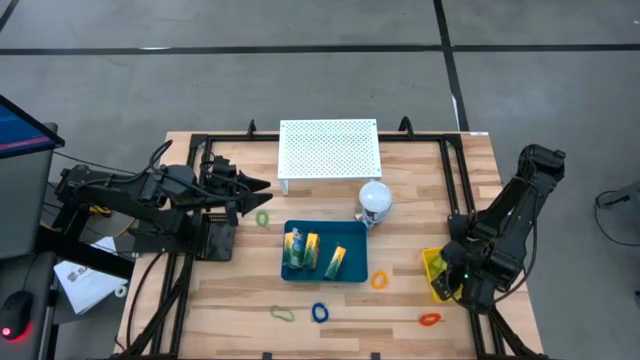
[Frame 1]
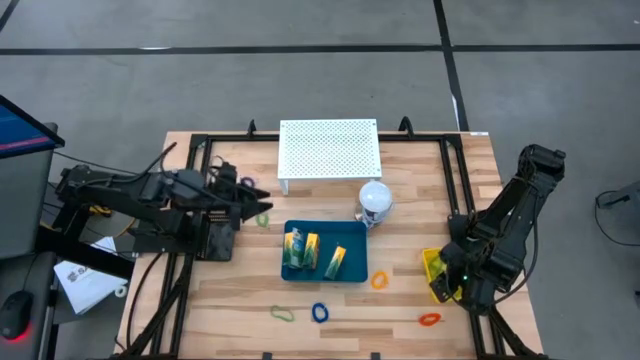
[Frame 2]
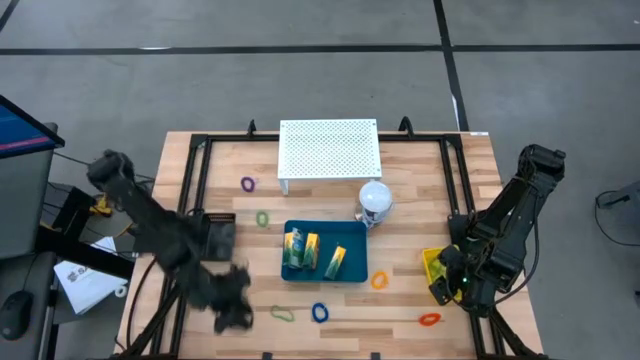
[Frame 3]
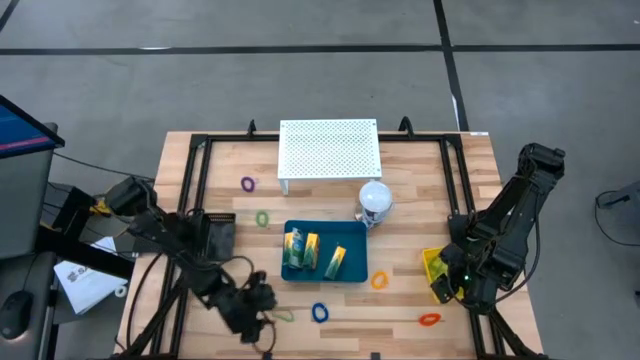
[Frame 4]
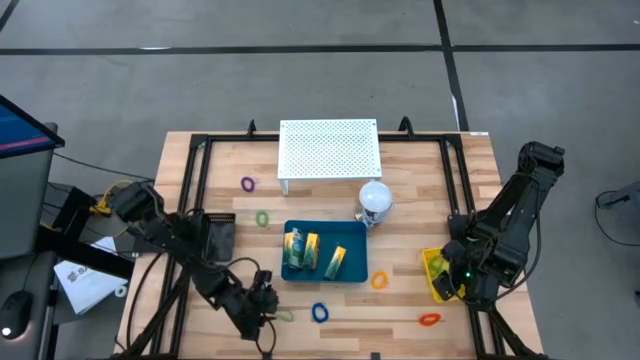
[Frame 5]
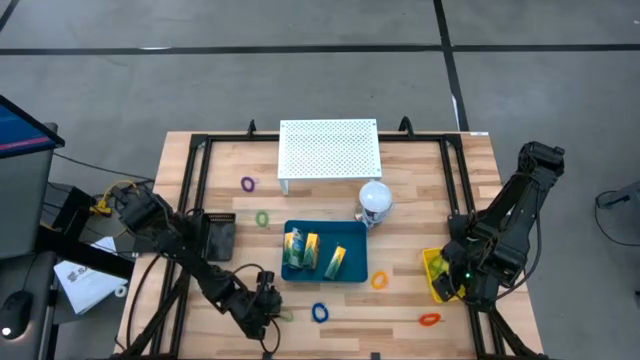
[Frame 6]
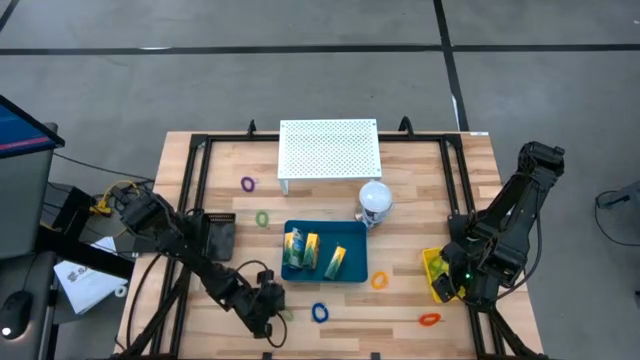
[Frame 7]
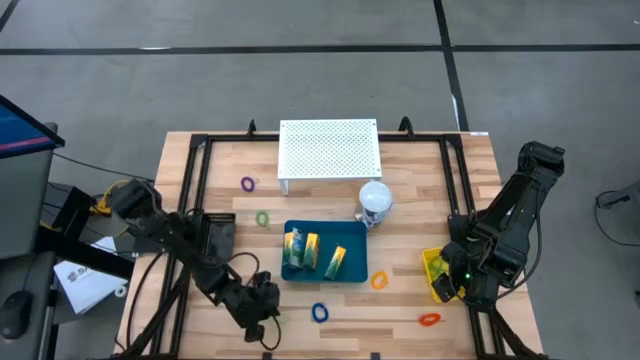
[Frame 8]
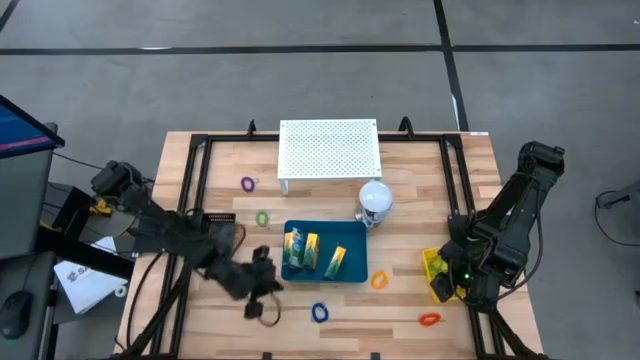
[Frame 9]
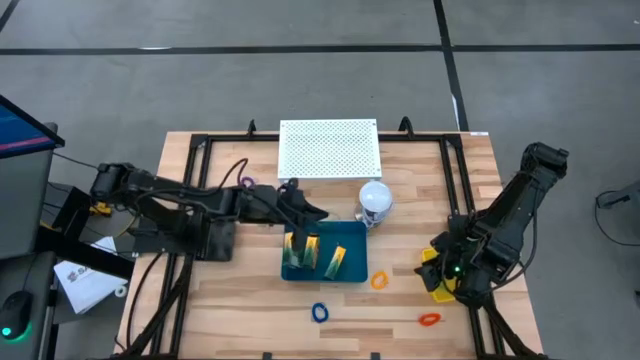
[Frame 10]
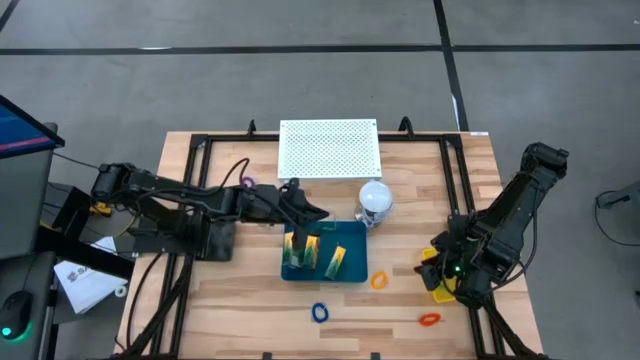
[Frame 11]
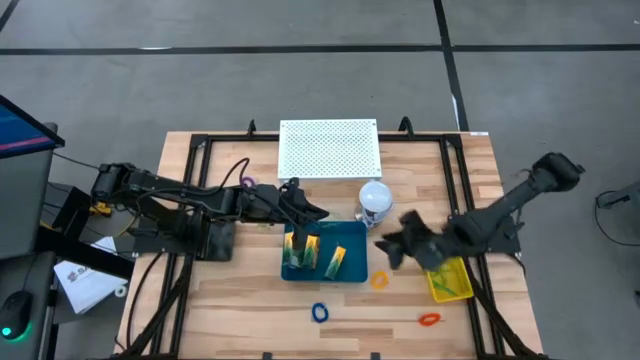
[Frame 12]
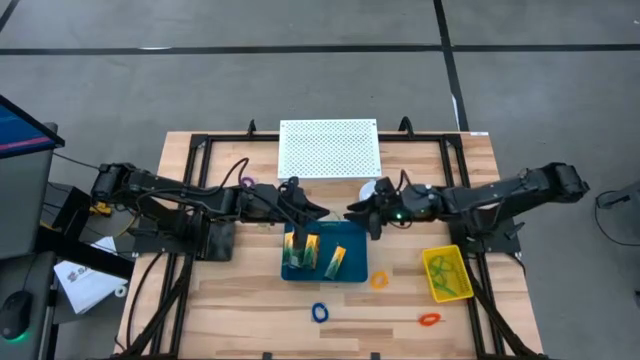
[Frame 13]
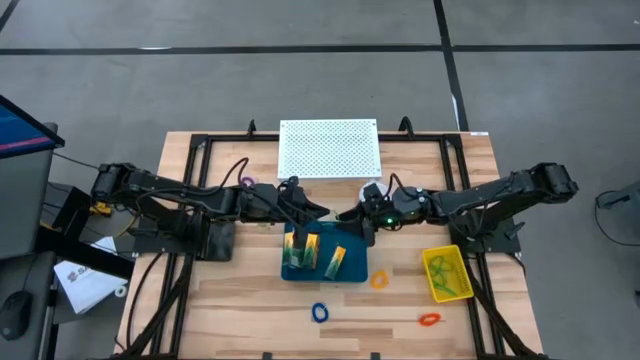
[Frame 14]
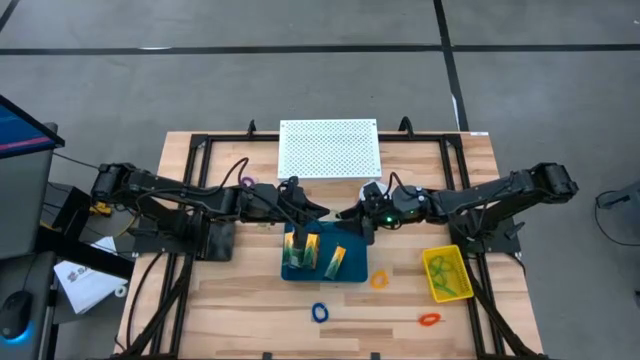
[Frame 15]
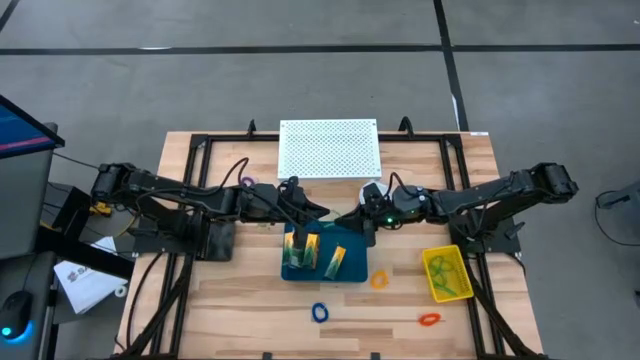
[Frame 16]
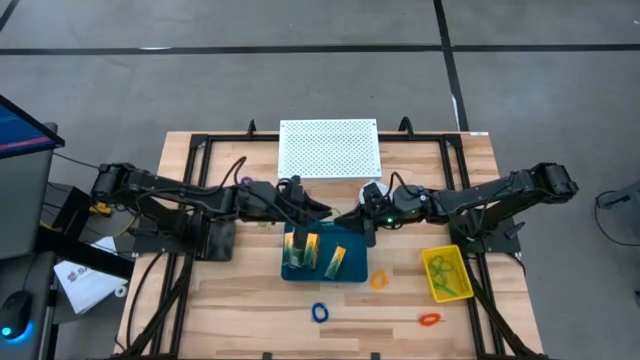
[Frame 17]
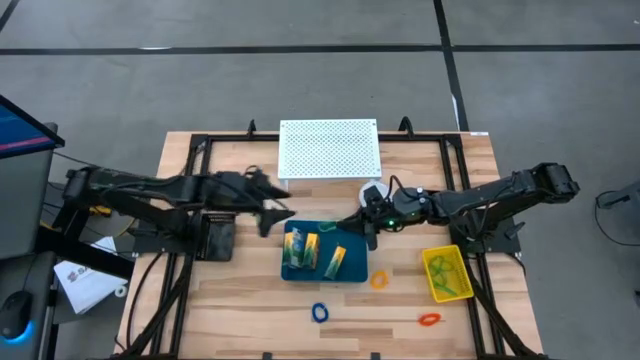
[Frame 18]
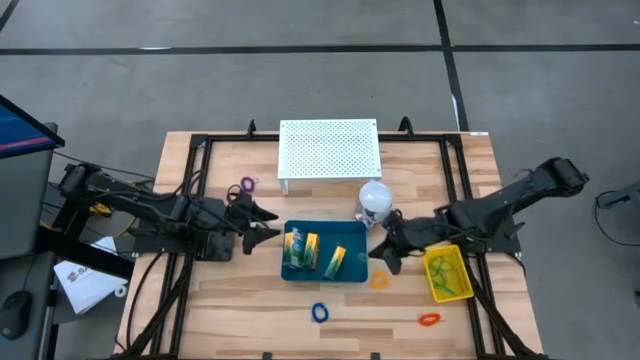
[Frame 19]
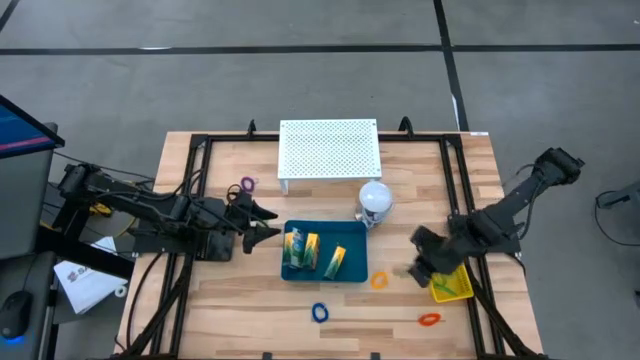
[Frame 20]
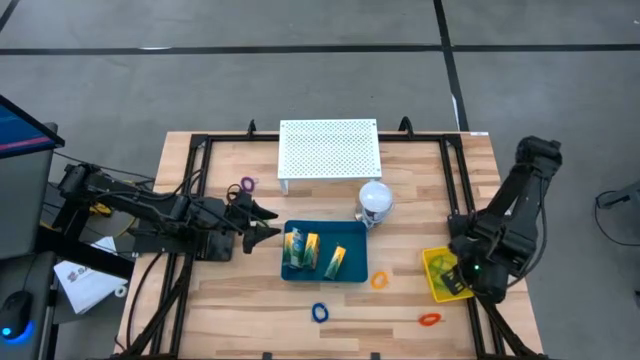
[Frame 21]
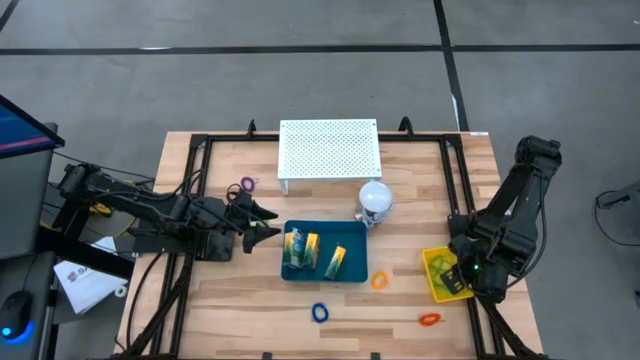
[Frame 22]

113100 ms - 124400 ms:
Task: Pick & Place Office Desk Supplies
Put the green rubber band into the yellow bin

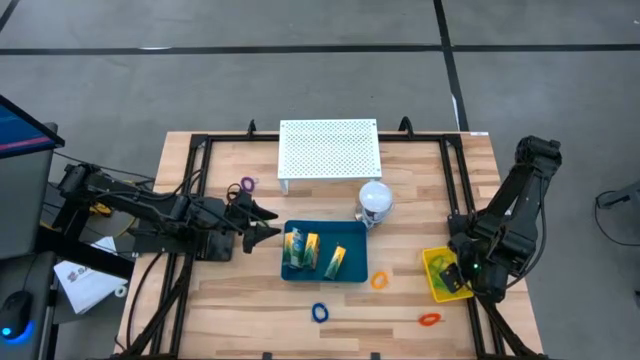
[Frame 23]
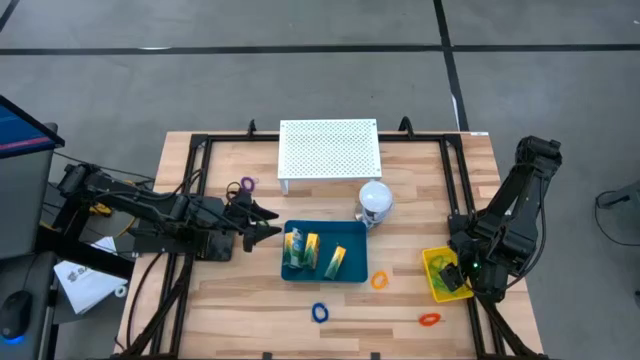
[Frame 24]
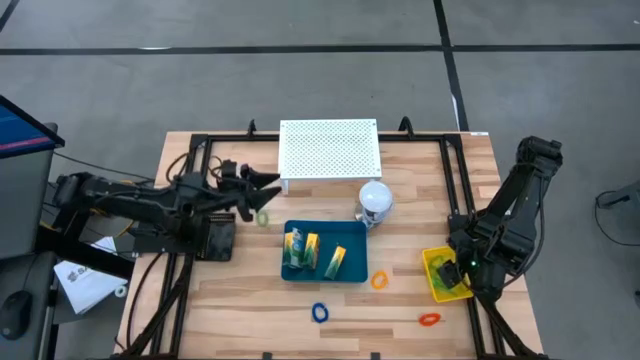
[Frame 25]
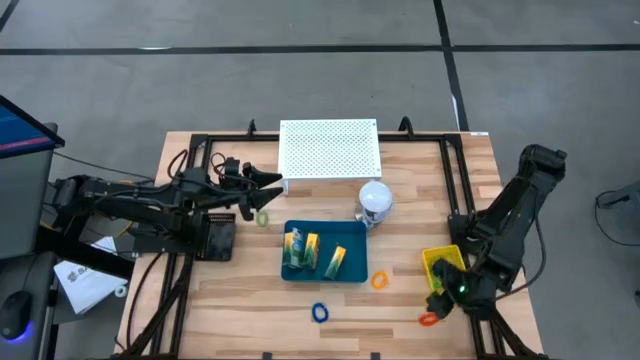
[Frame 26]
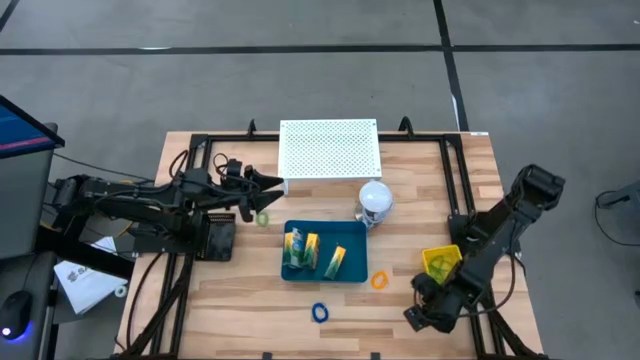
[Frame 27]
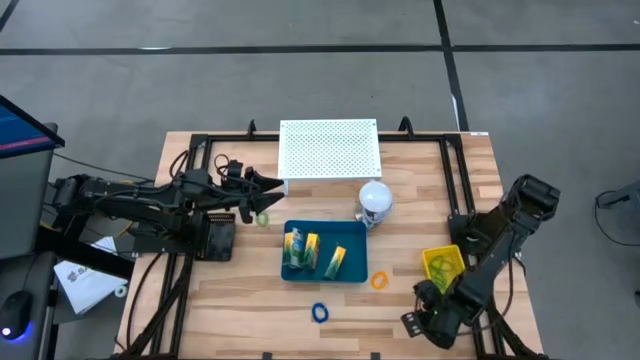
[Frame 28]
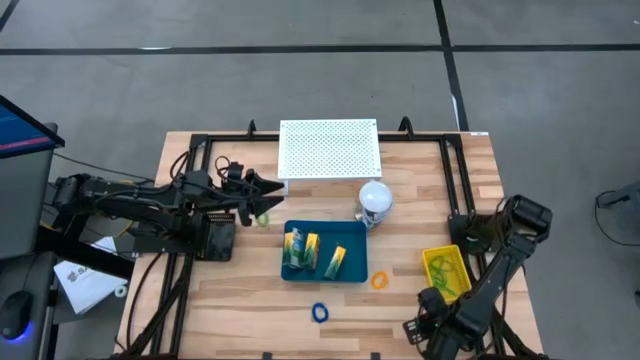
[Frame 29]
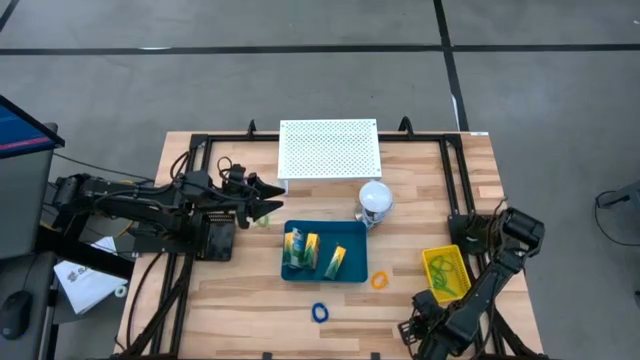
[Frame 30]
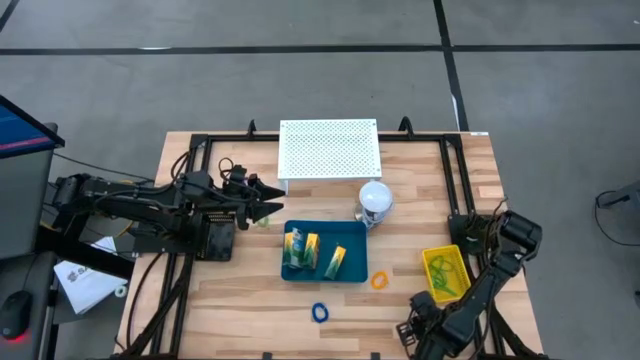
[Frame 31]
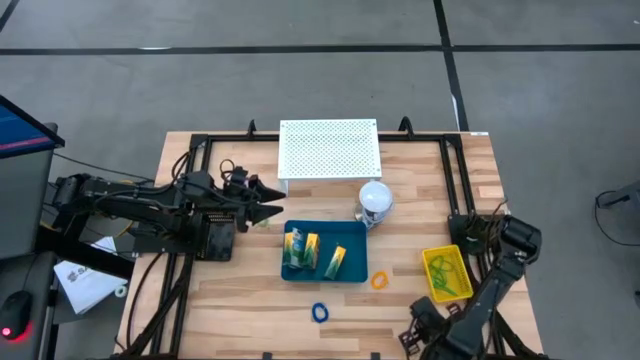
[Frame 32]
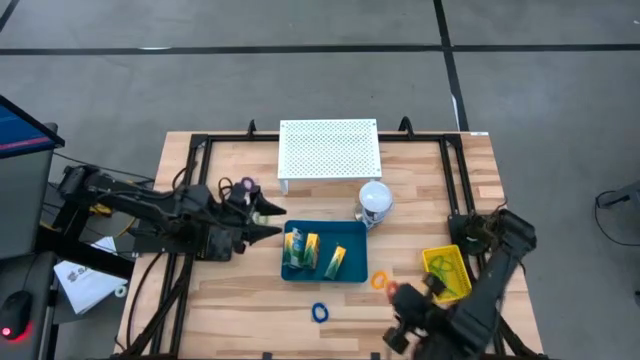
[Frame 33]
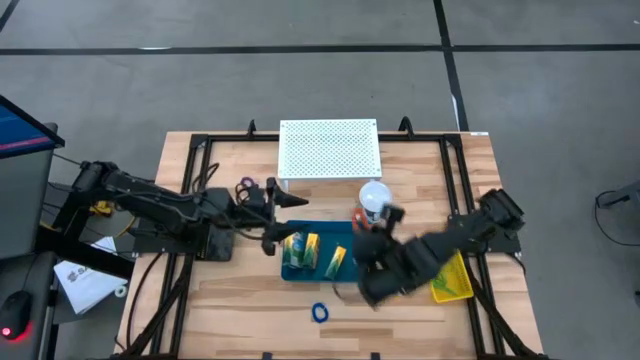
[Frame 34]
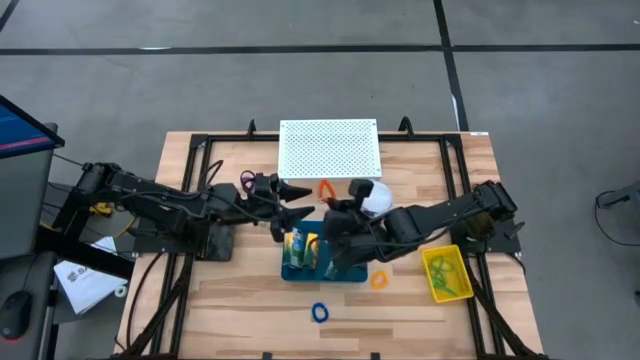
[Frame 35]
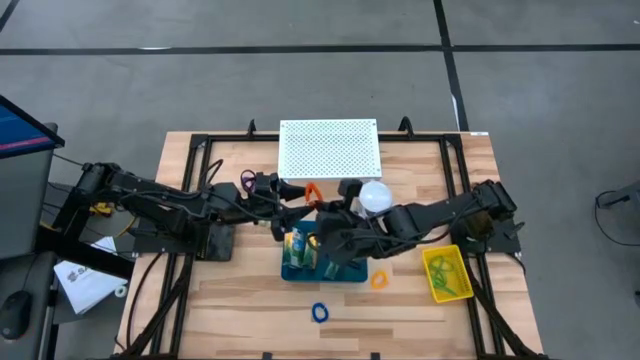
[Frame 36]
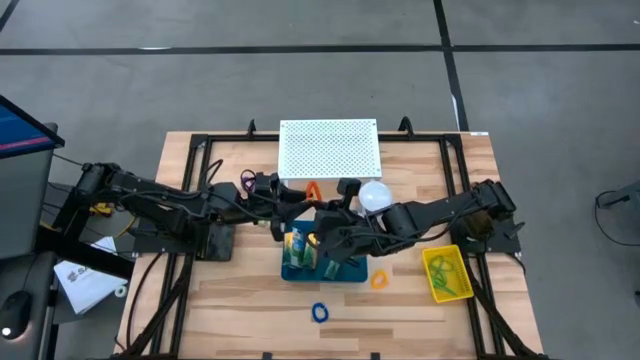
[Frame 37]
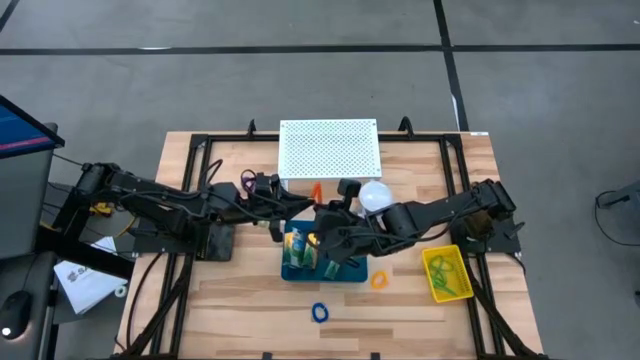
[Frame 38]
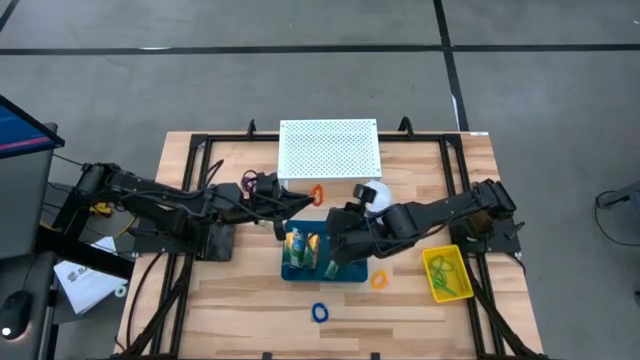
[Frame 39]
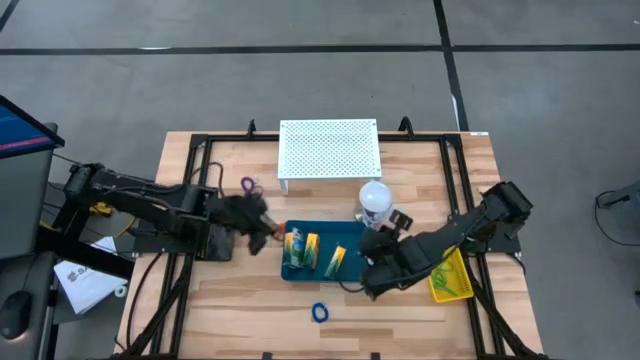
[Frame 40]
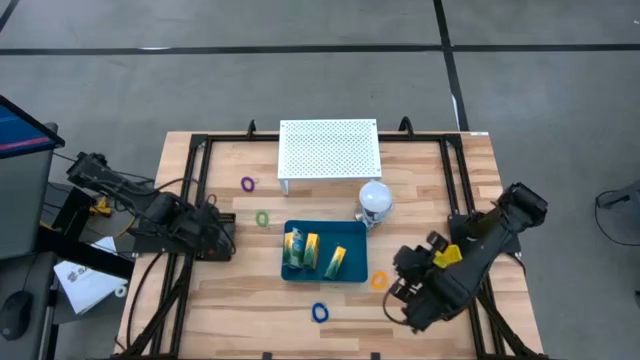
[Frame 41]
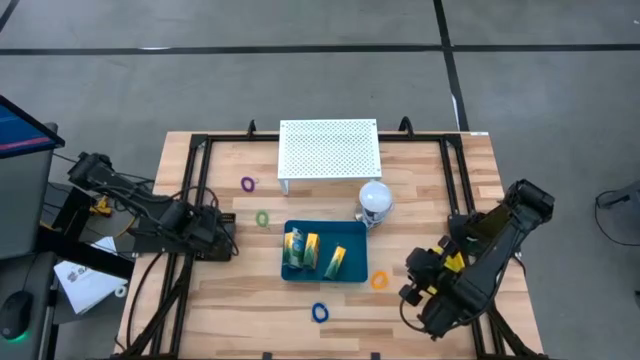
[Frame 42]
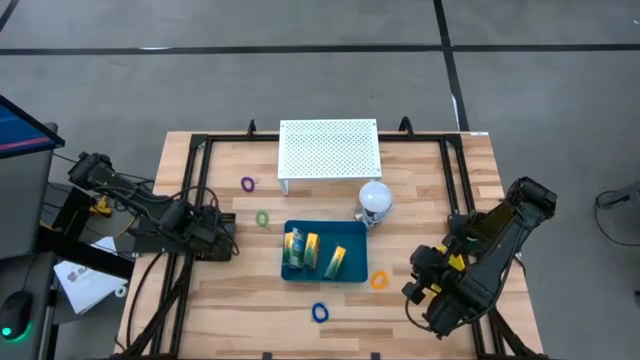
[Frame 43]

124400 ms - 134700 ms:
Put the orange spring keychain into the black bin
